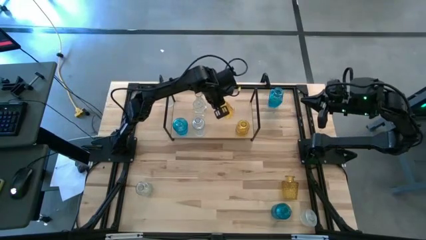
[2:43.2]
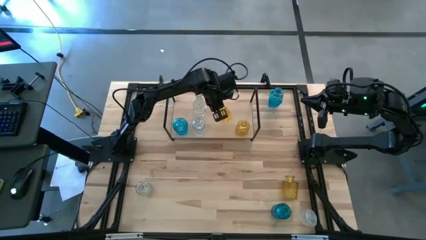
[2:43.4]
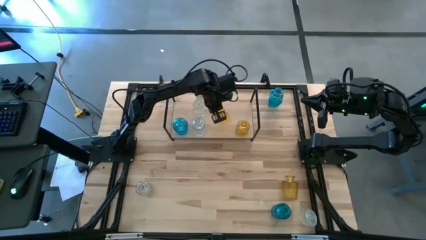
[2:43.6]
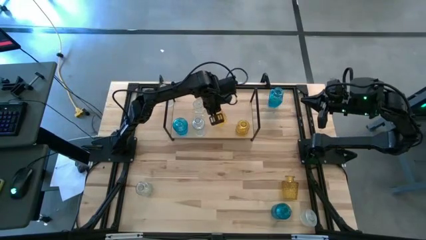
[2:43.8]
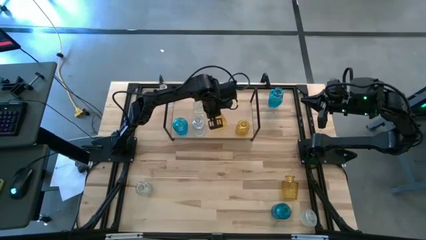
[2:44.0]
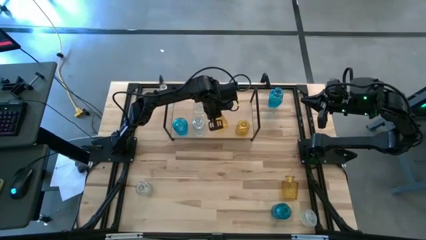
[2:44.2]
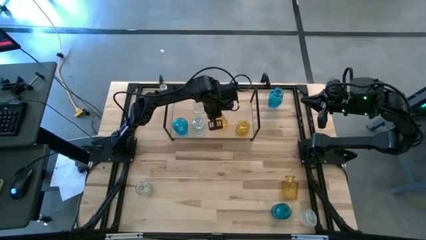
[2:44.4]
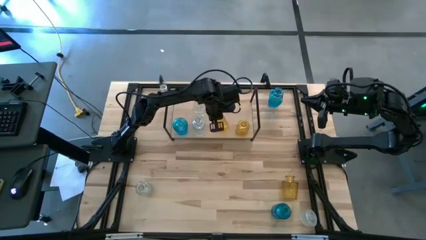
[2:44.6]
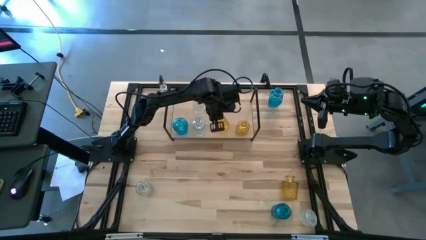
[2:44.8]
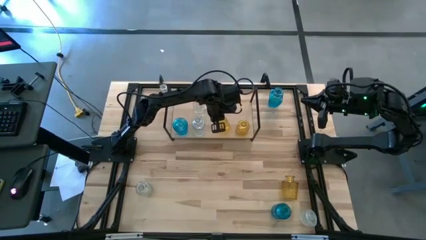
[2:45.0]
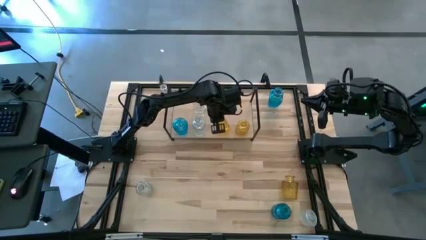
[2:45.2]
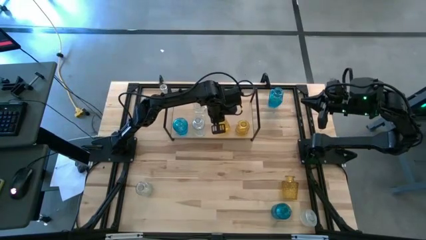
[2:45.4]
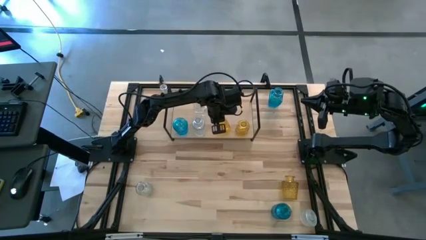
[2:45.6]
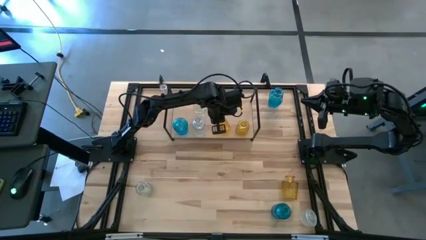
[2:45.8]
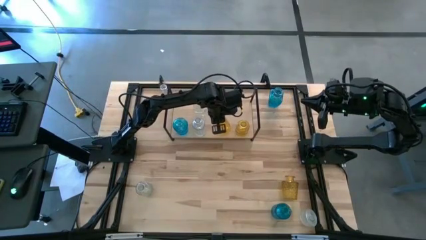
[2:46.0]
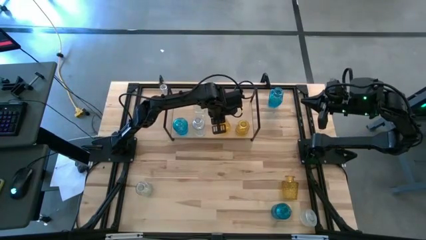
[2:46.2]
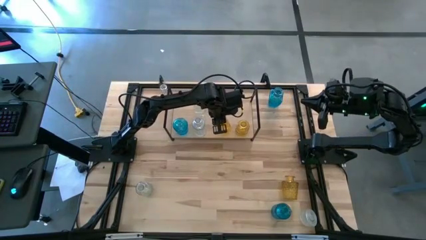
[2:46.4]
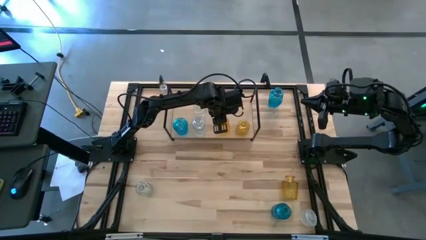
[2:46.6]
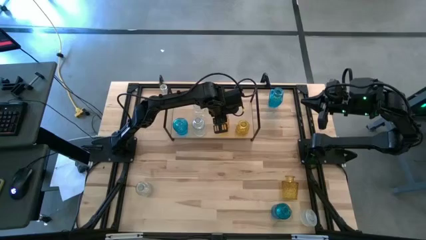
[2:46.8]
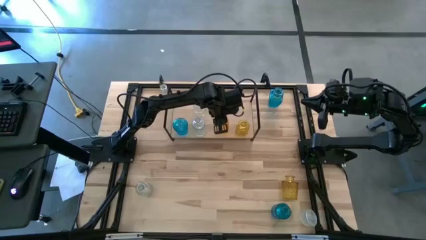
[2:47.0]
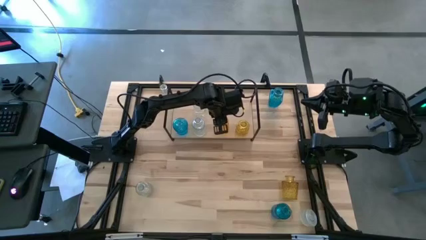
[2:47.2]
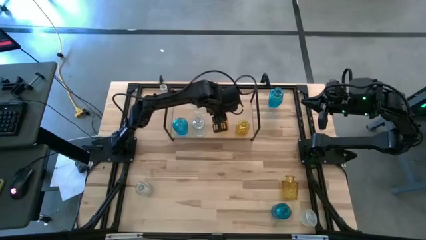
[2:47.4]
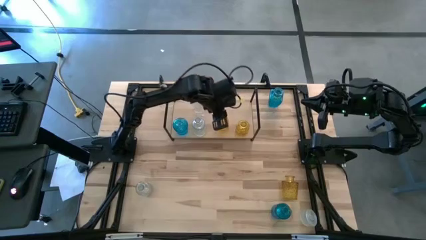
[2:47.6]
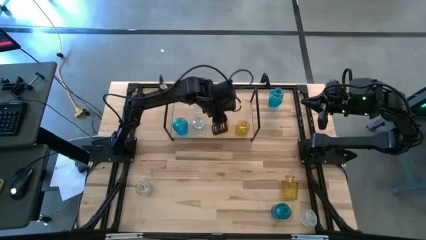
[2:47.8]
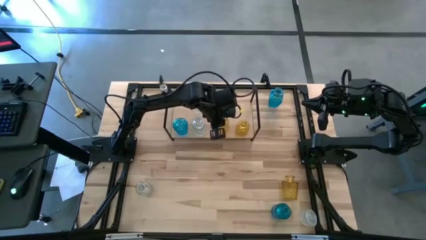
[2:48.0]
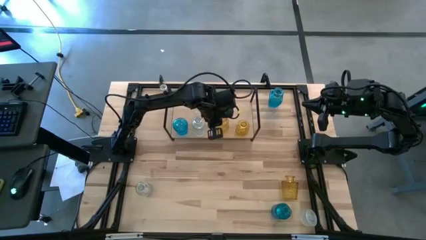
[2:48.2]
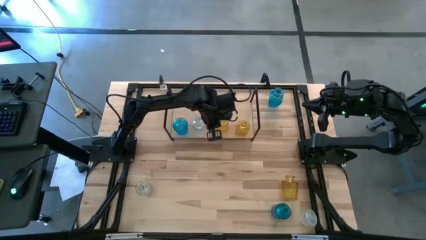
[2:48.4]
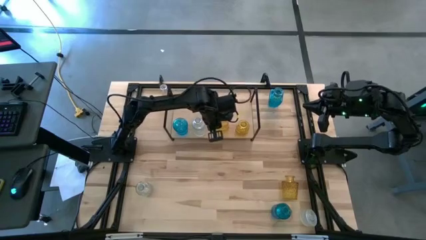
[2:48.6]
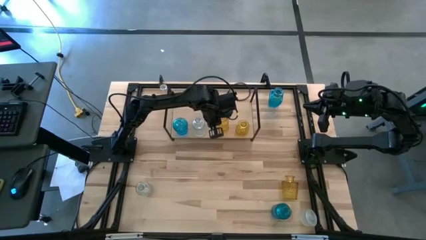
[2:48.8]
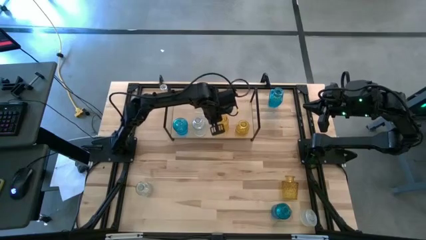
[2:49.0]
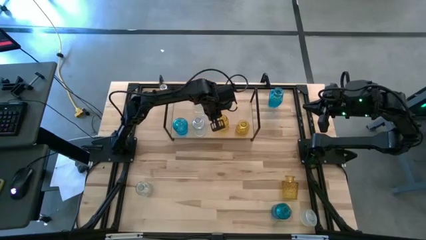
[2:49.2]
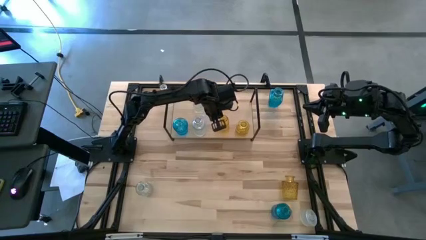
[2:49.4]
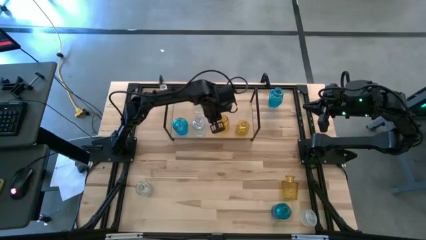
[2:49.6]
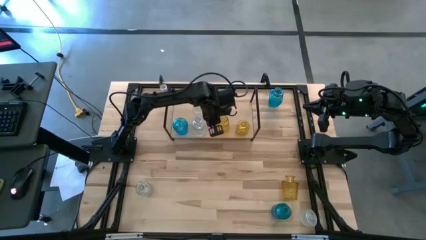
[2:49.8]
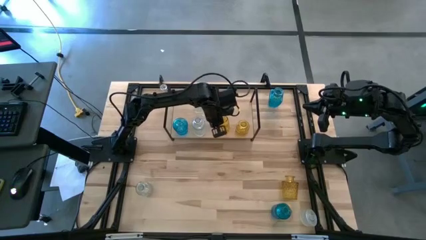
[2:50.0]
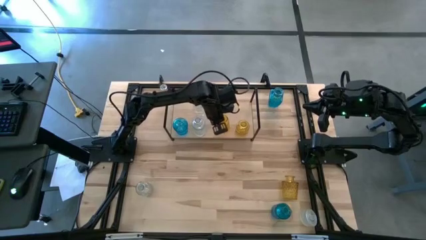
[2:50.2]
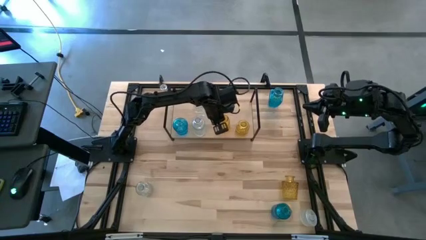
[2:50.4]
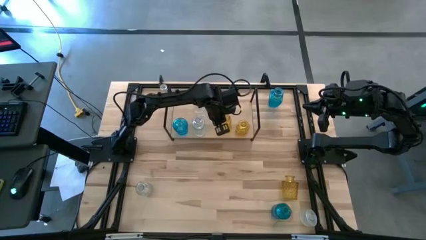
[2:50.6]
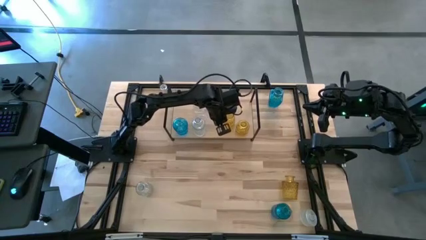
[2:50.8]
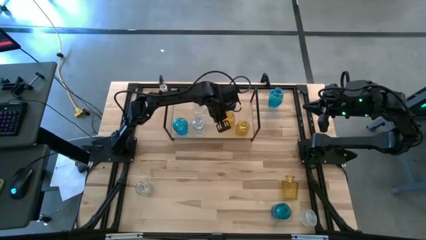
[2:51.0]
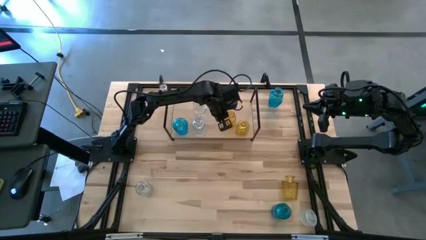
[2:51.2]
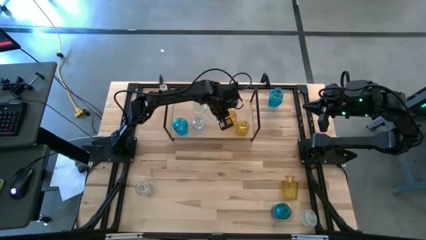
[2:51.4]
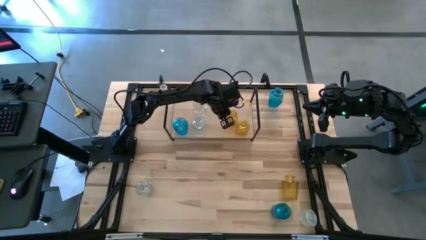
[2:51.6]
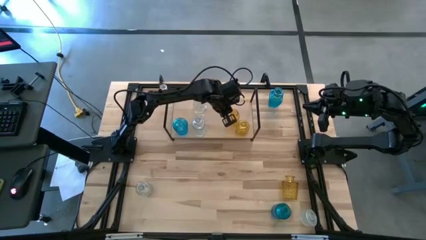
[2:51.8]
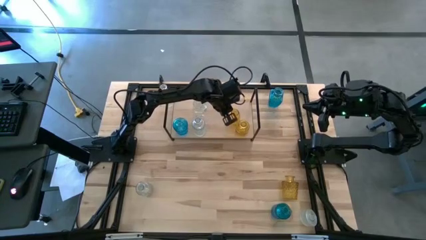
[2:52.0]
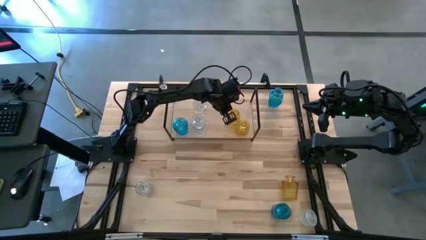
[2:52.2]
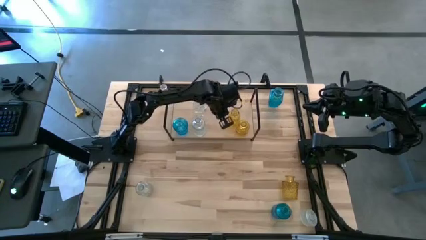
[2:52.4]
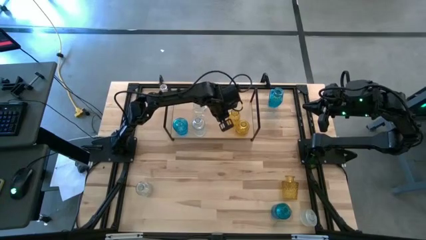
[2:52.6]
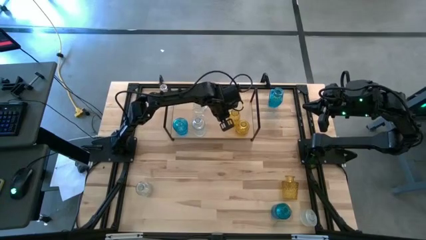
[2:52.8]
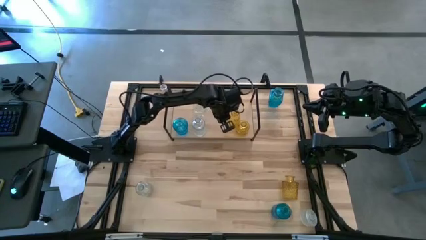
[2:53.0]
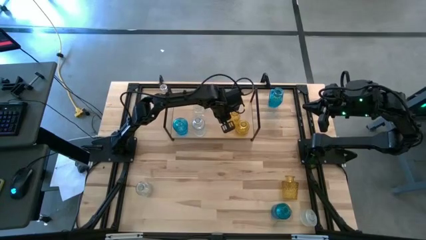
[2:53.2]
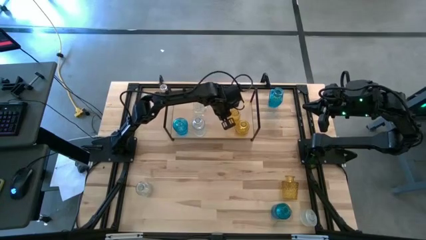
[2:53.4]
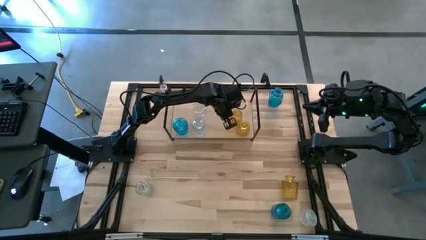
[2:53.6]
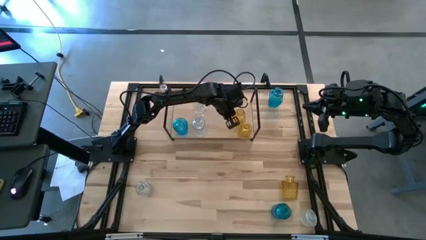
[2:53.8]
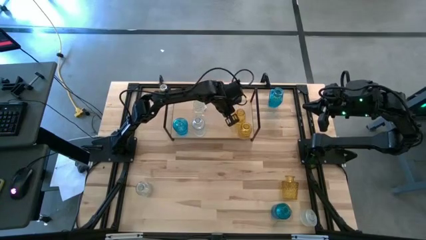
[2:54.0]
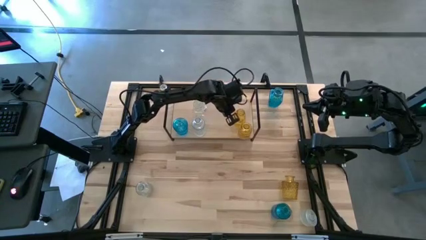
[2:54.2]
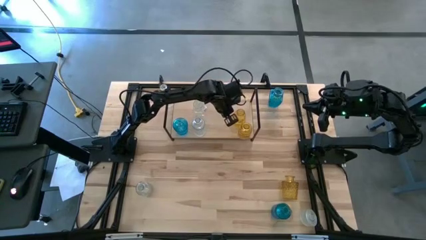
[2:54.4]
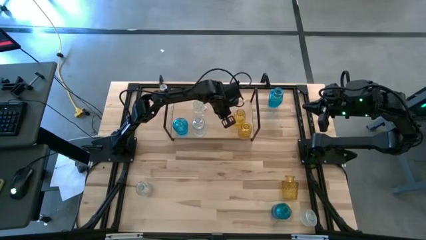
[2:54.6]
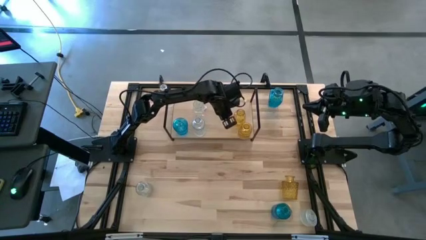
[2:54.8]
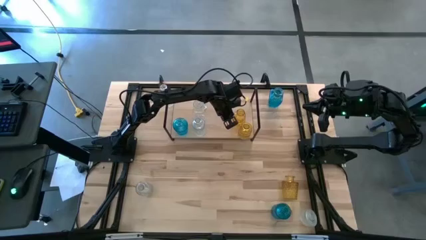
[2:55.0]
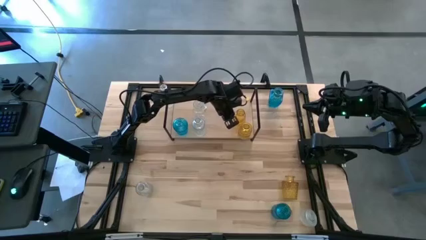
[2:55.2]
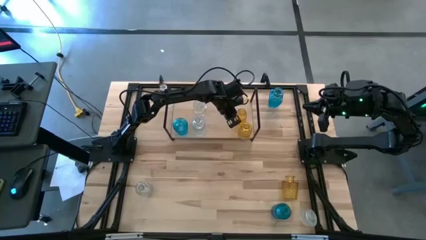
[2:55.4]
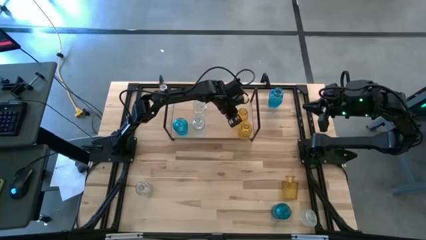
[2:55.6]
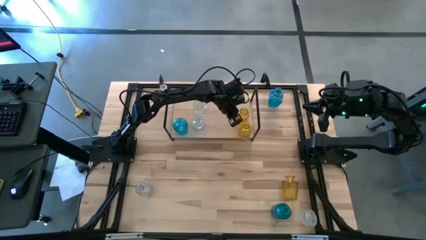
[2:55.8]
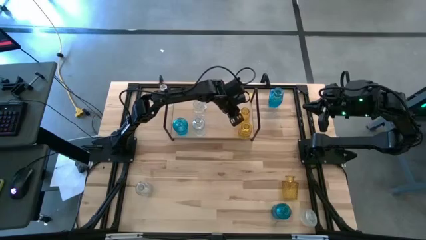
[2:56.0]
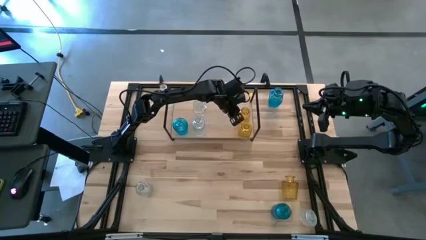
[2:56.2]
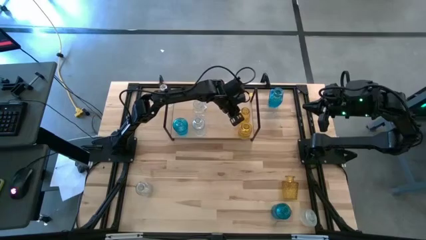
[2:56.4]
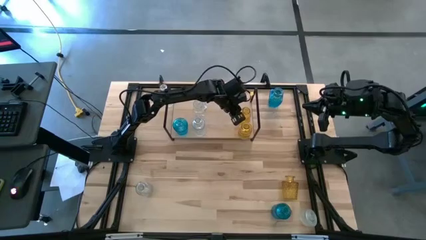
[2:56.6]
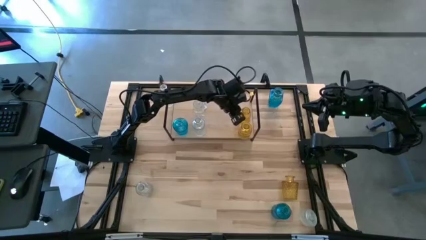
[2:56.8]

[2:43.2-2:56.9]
Task: sort vases onto shelf
Put the yellow vase on the shelf aligned with the other yellow vase

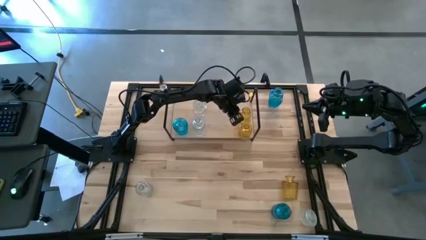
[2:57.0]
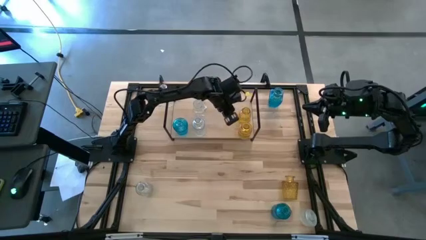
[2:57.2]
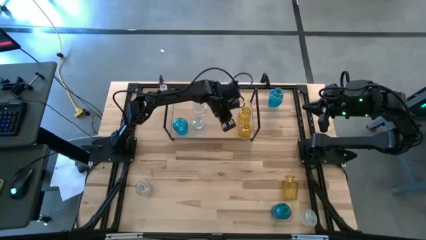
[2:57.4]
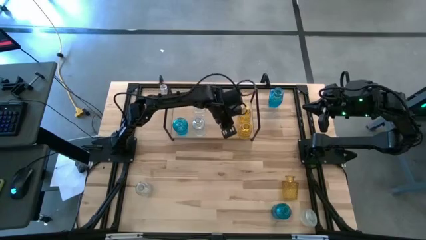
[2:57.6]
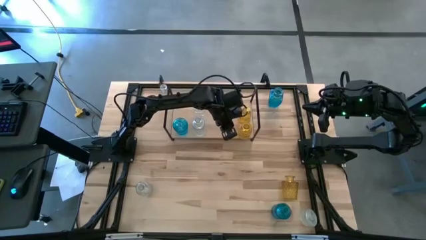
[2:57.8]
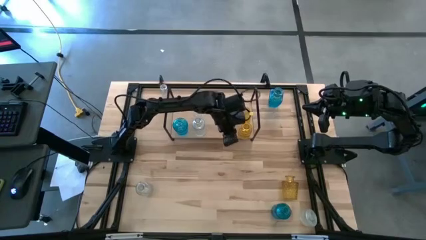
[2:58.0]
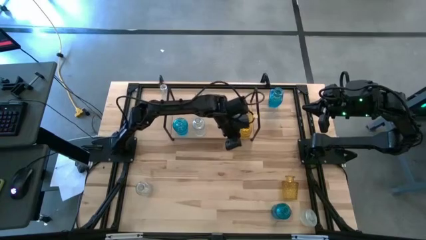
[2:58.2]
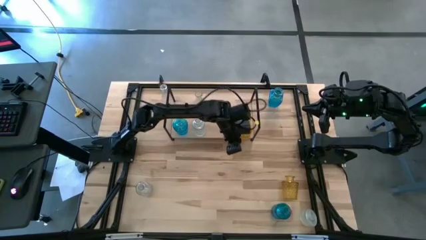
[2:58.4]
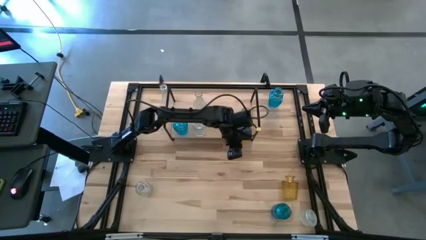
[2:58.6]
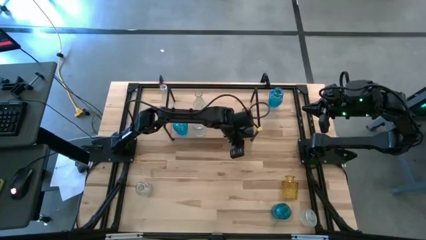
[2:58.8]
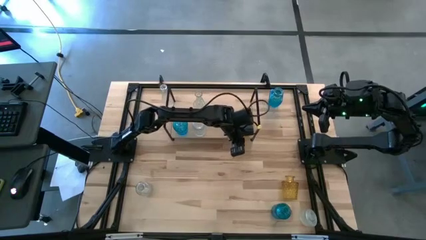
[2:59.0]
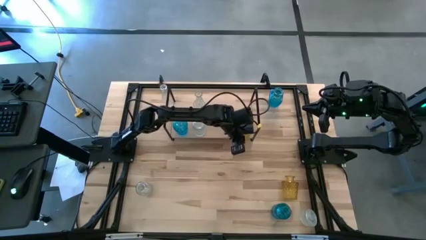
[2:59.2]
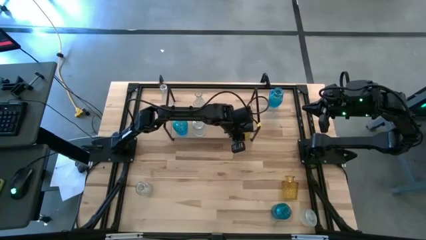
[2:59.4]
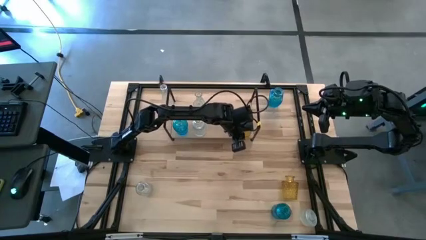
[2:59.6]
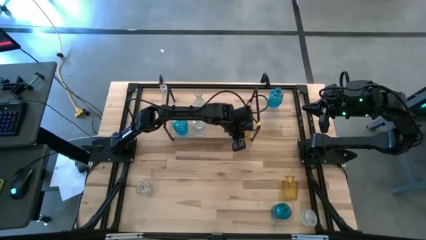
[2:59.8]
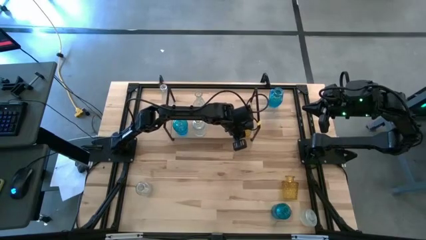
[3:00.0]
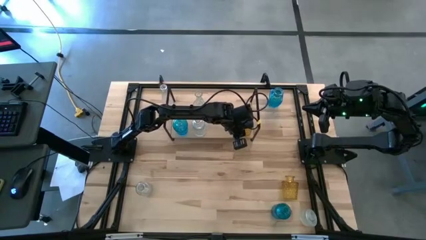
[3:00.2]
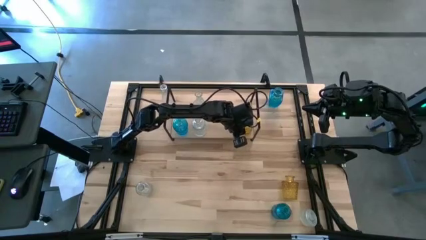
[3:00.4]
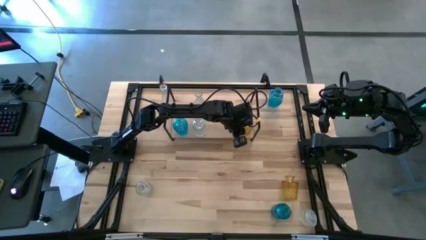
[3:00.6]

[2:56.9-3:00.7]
Adjust the yellow vase on the shelf
